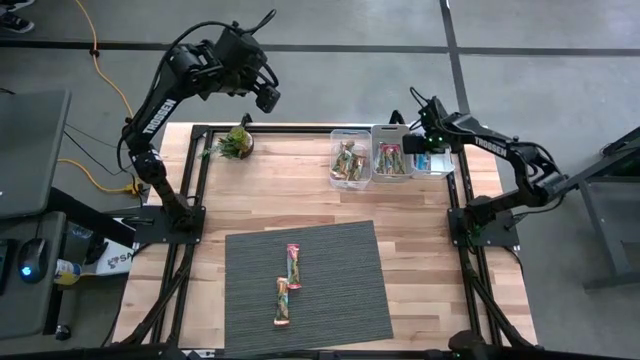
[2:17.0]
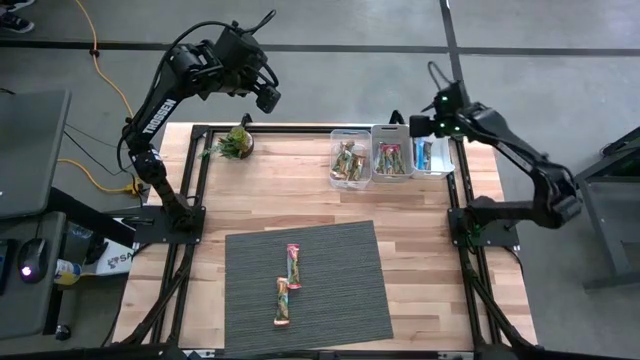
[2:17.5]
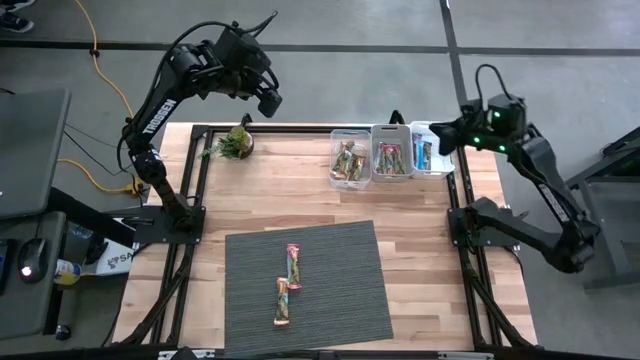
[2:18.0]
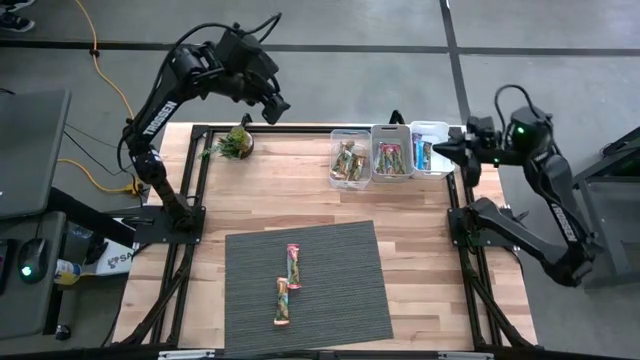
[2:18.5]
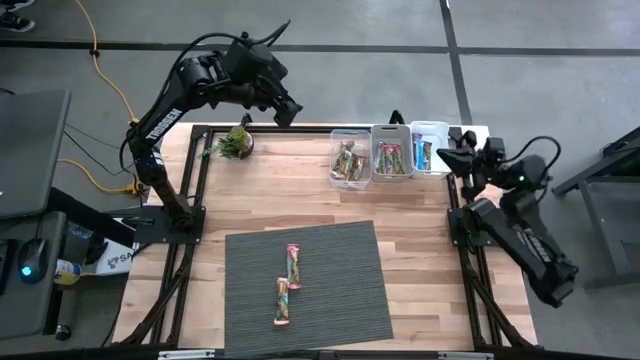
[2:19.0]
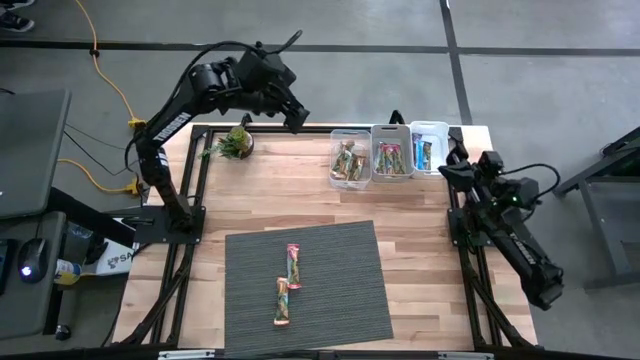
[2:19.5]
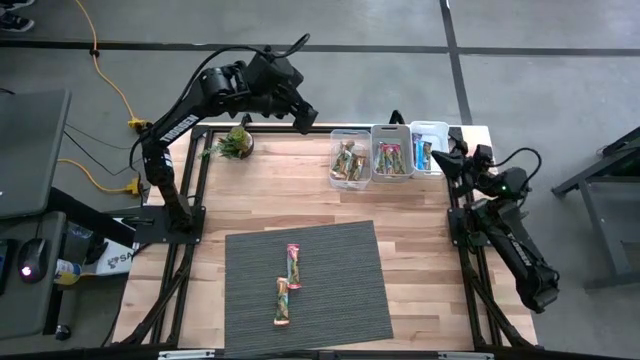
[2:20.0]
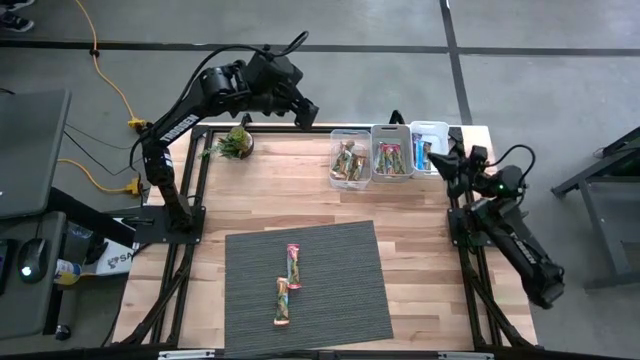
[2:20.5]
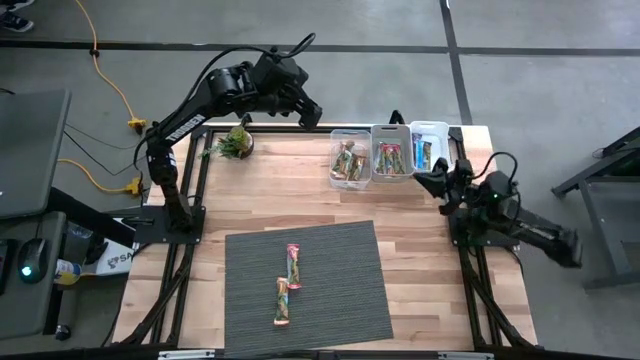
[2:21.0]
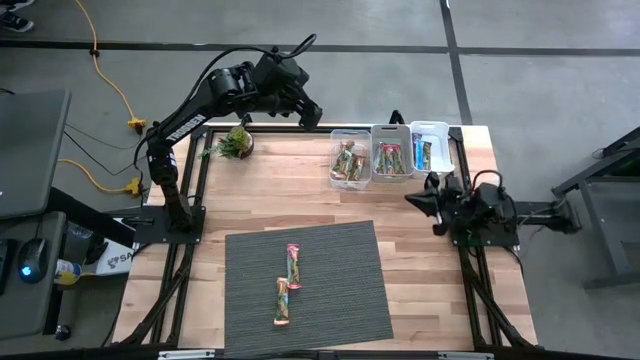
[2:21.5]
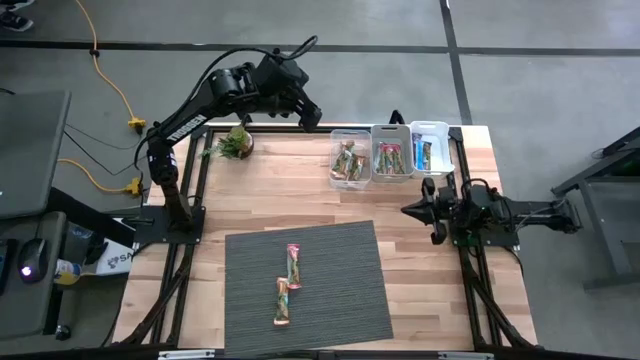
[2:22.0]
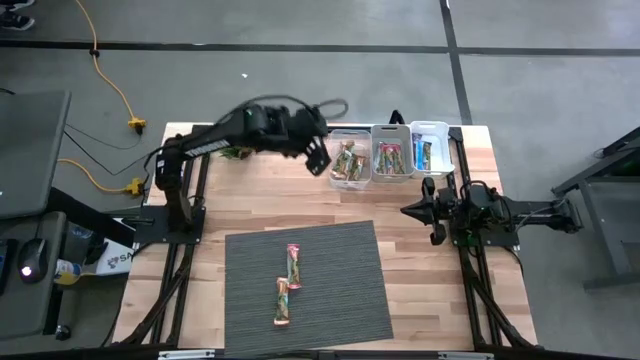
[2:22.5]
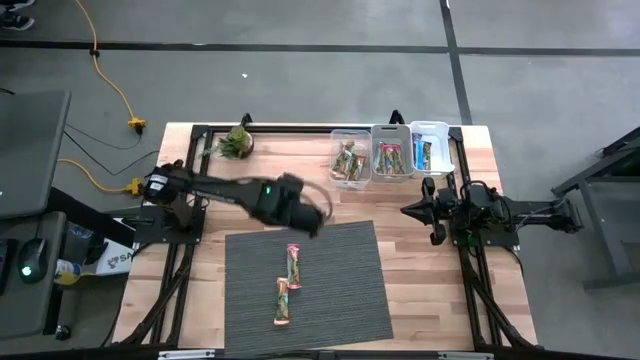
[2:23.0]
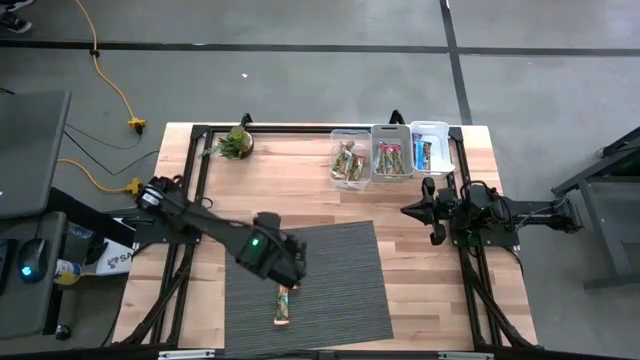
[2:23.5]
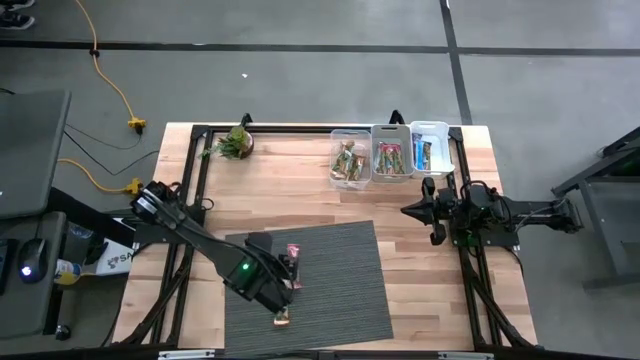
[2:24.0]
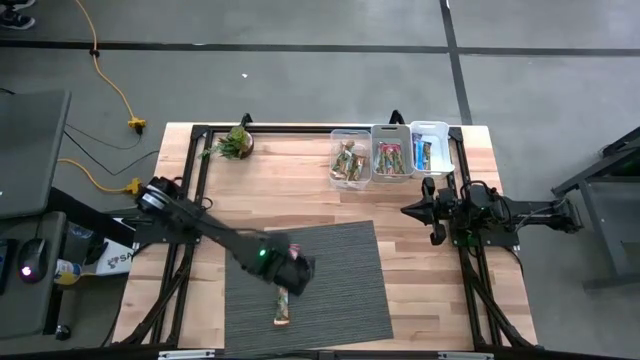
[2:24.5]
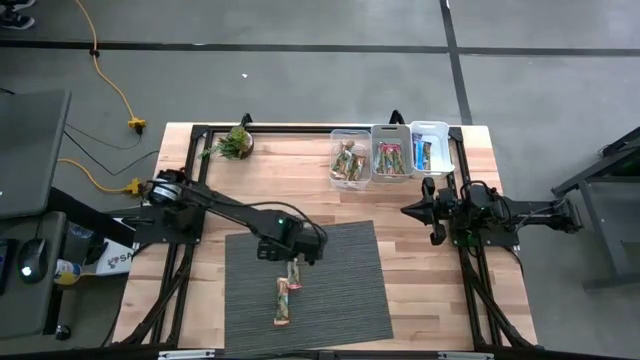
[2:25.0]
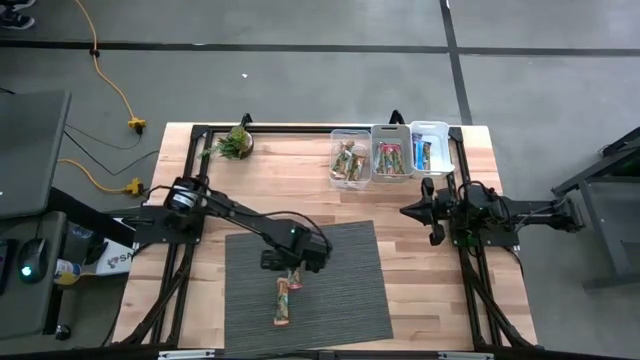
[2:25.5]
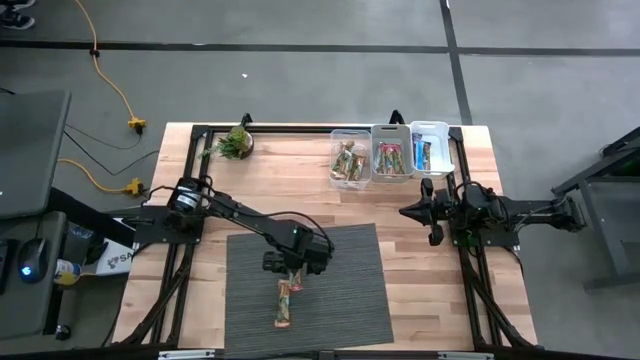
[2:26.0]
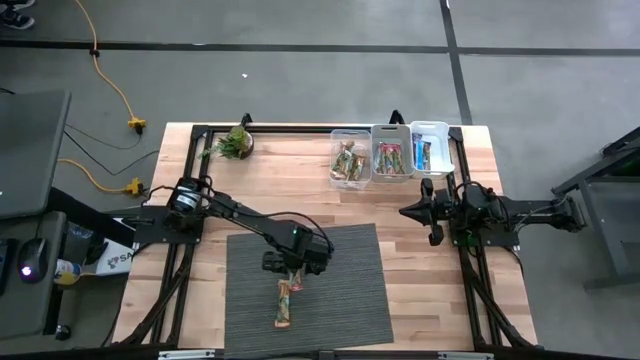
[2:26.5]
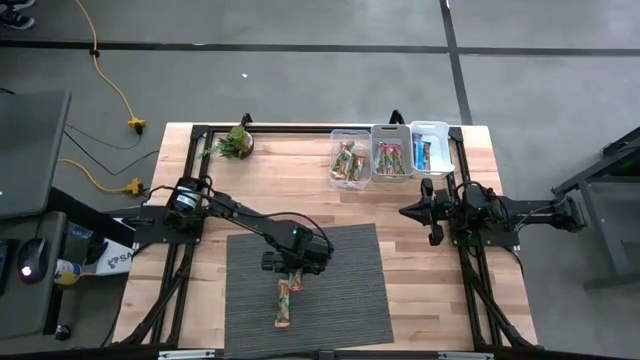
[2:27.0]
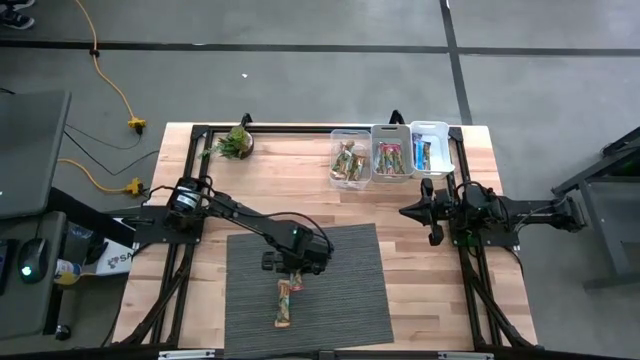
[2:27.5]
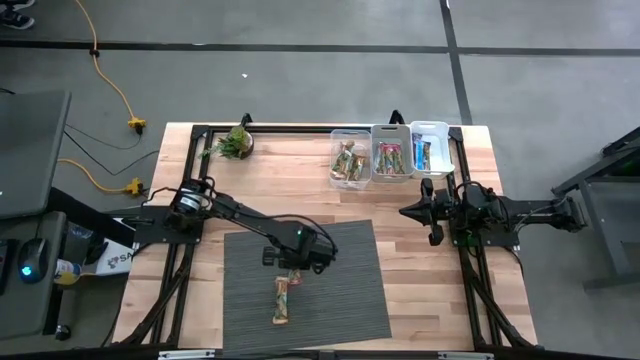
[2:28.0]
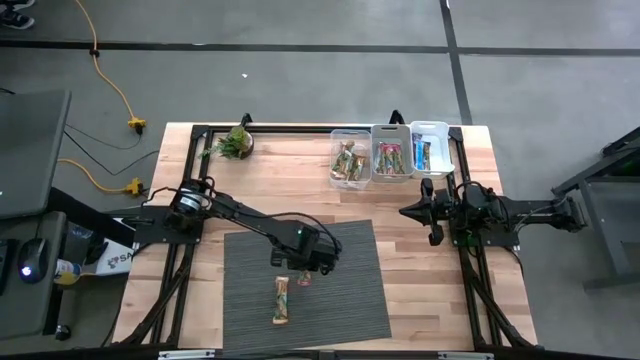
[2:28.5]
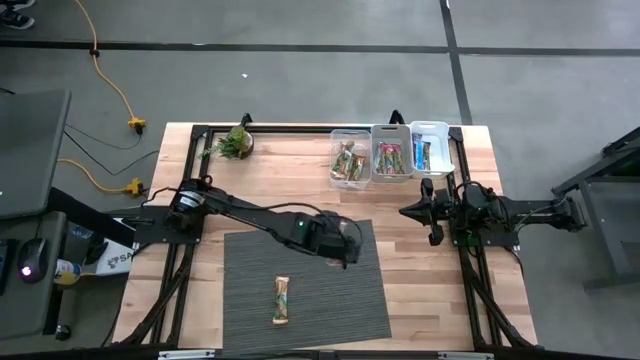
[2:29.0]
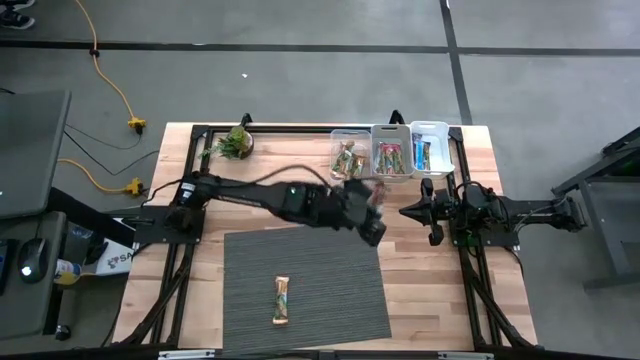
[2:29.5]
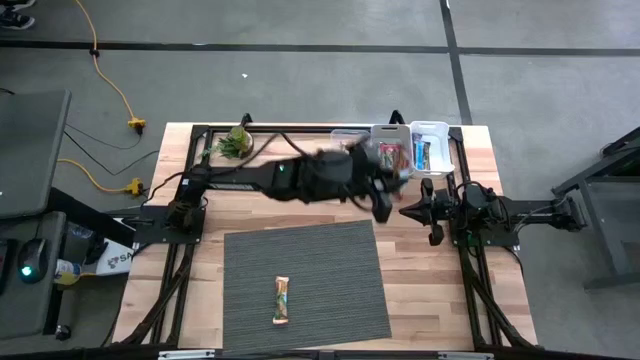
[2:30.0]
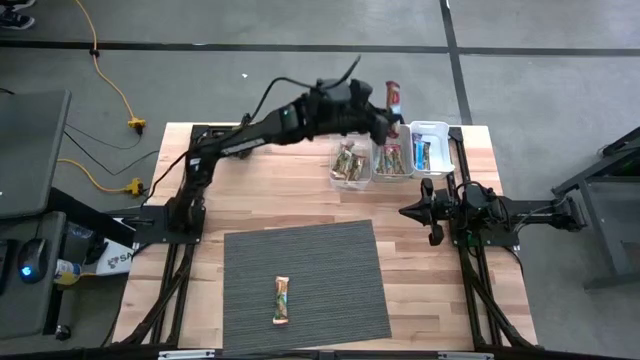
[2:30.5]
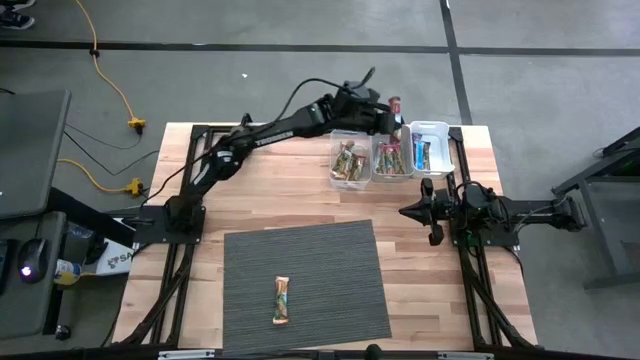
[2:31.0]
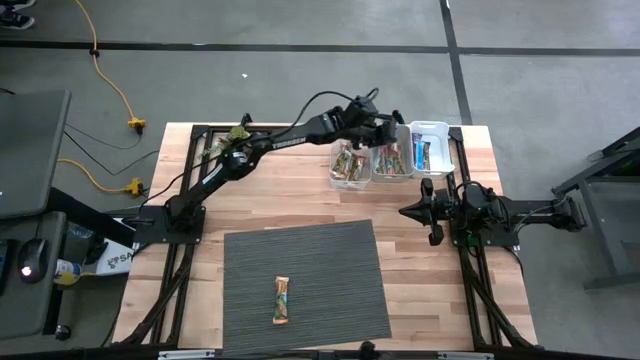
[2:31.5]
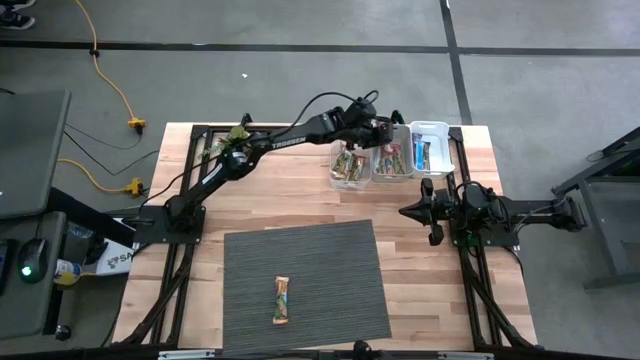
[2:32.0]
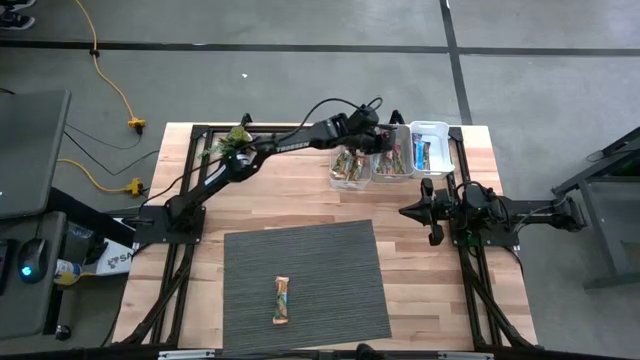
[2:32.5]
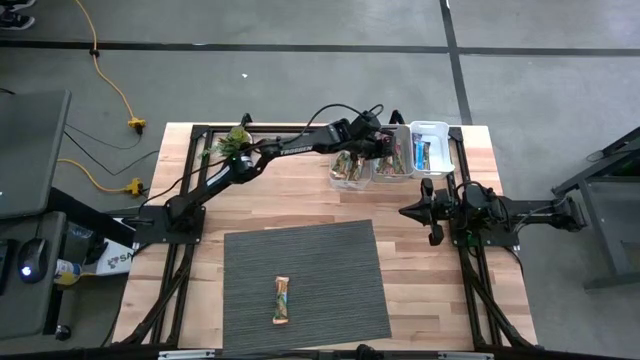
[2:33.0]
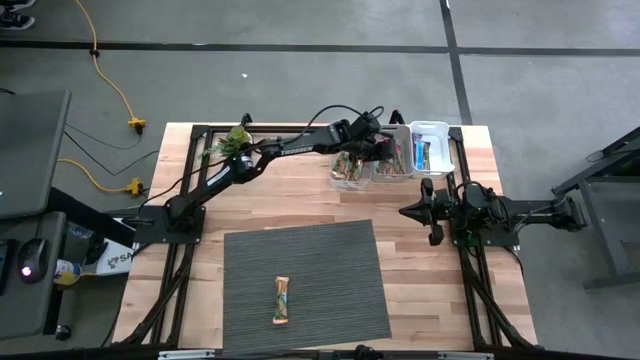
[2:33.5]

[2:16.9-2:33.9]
Task: Pick and place Granola Bars by type
Put the red granola bar into the gray bin

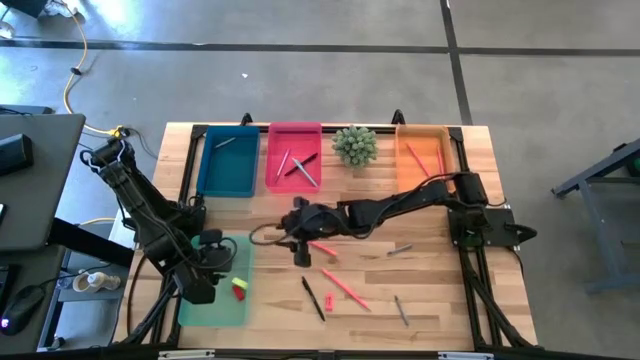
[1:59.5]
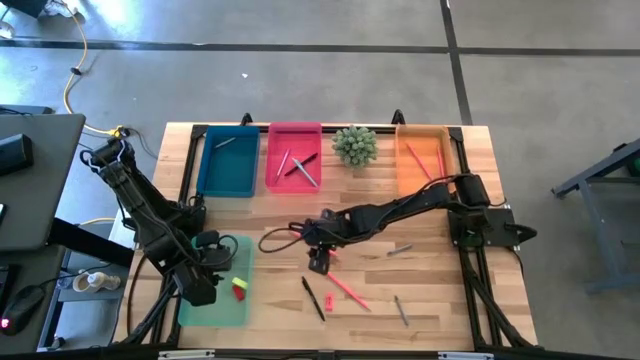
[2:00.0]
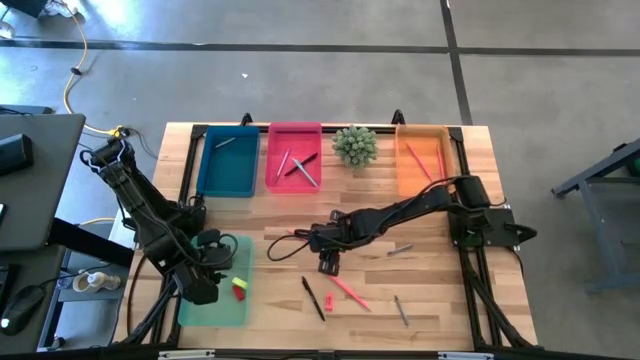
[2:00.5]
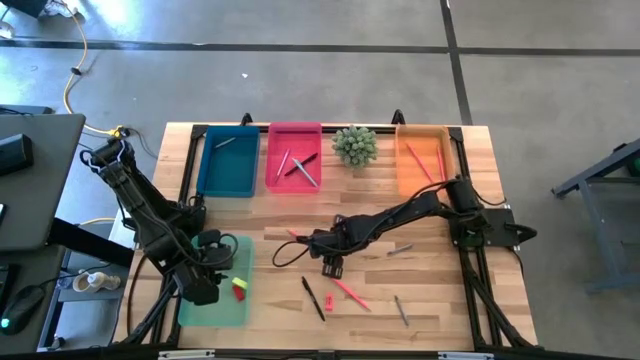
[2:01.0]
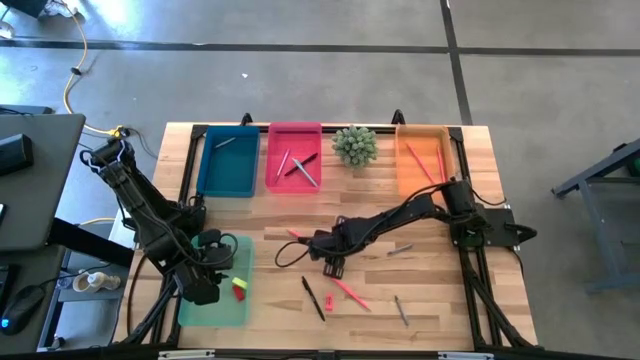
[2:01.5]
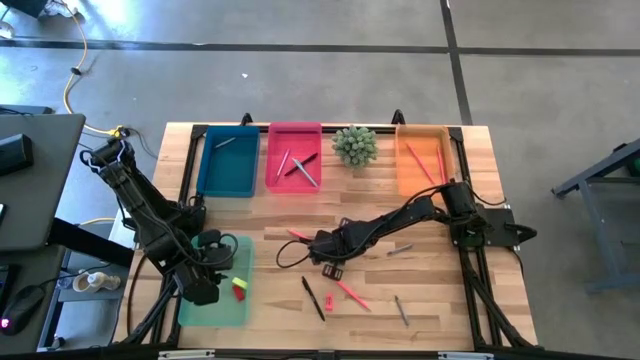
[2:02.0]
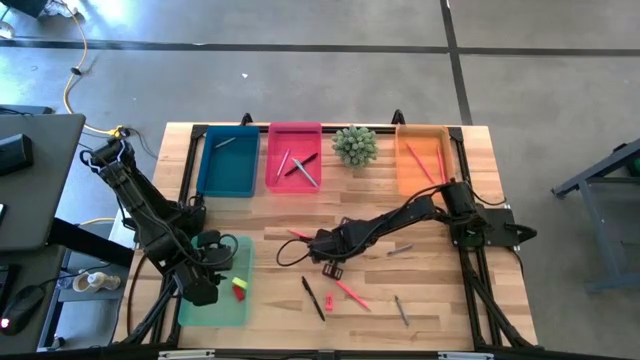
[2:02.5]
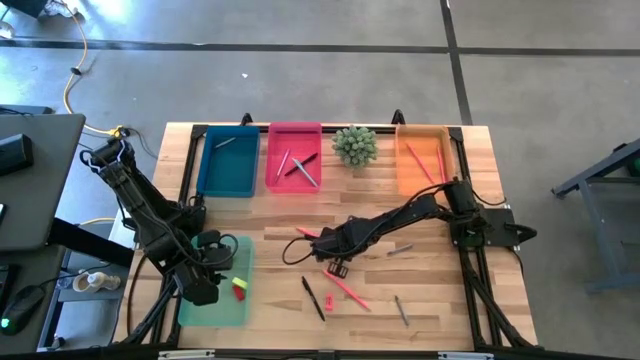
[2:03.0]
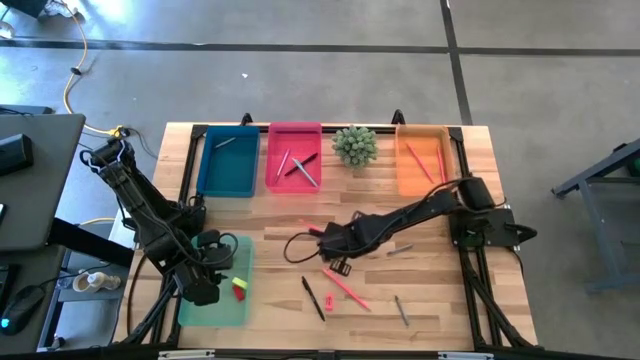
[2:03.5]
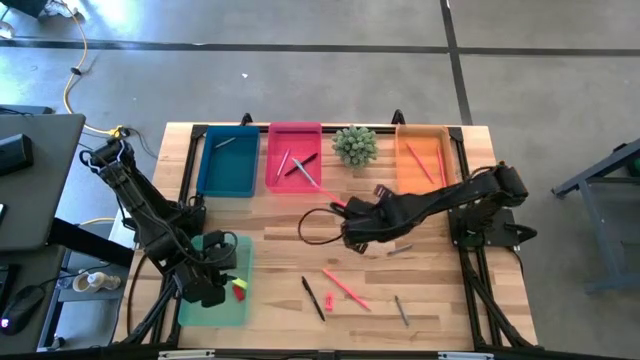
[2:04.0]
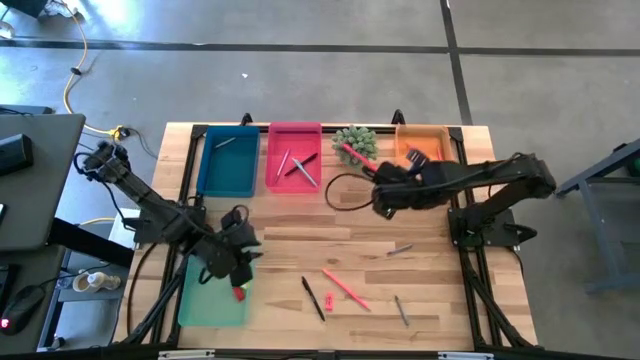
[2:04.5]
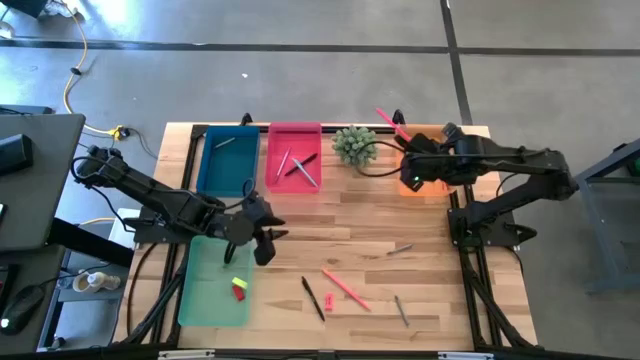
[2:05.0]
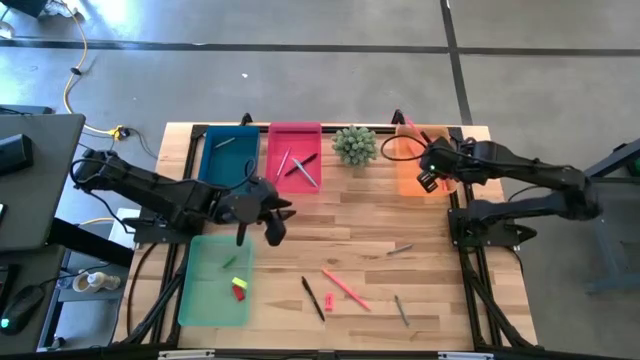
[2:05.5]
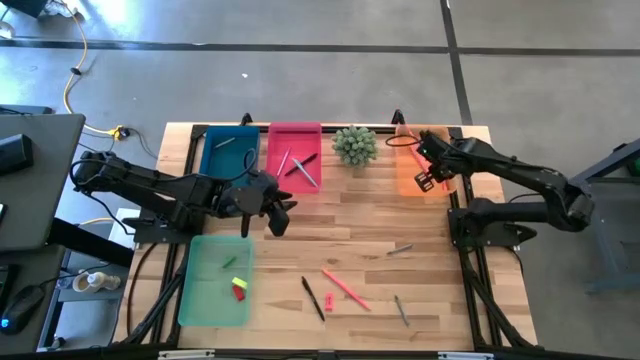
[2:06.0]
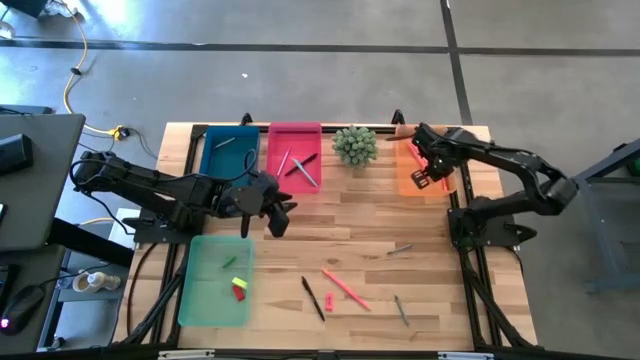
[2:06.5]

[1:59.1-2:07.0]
Task: Sort crayons/erasers/pens/pencils in bins
Put the pink pencil into the orange bin
